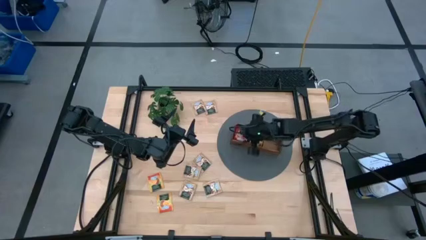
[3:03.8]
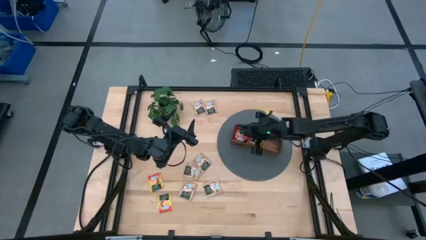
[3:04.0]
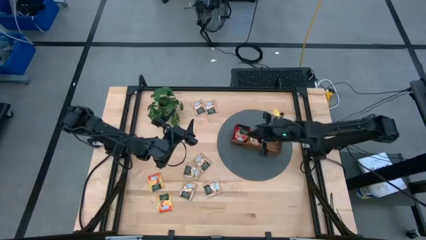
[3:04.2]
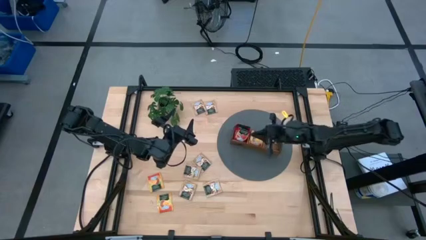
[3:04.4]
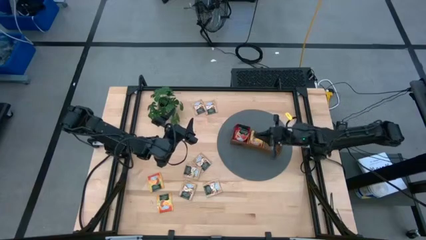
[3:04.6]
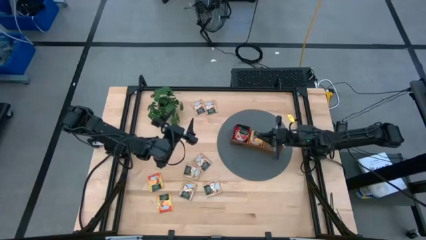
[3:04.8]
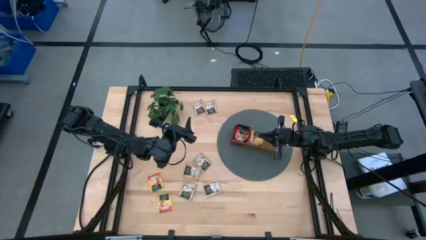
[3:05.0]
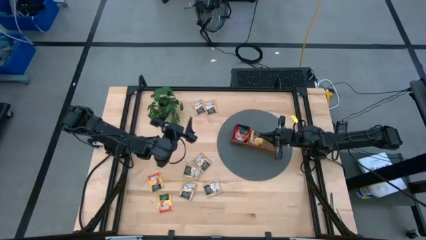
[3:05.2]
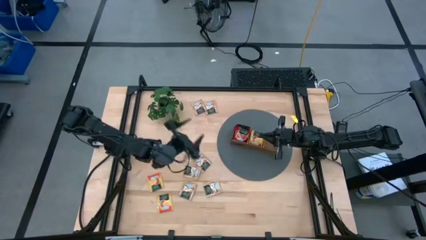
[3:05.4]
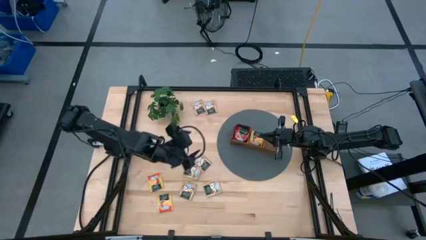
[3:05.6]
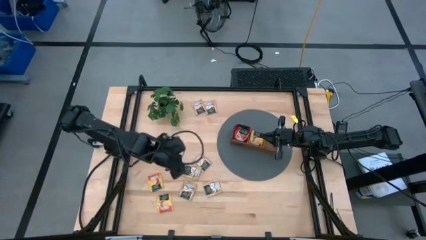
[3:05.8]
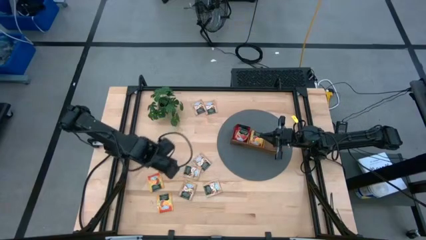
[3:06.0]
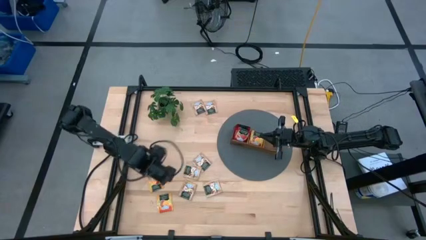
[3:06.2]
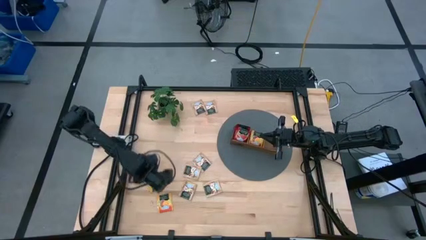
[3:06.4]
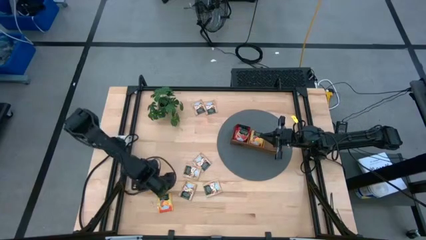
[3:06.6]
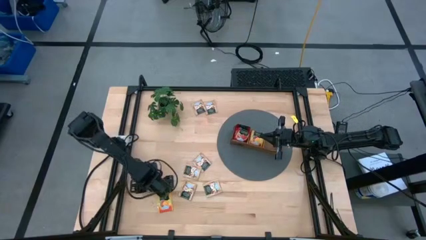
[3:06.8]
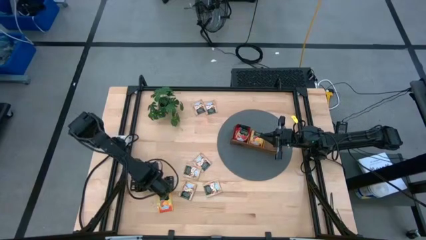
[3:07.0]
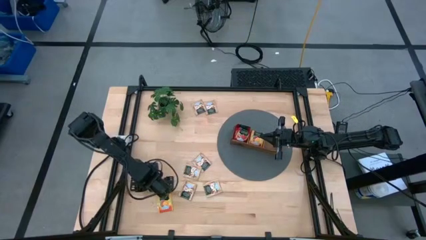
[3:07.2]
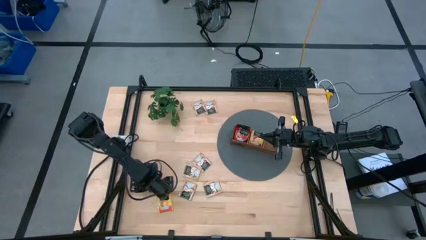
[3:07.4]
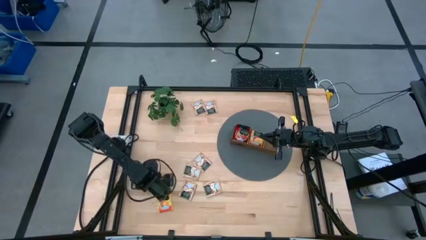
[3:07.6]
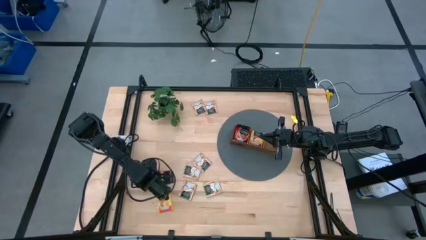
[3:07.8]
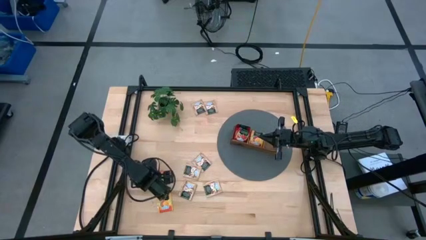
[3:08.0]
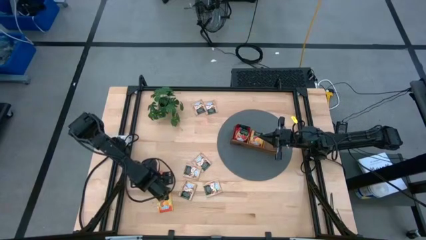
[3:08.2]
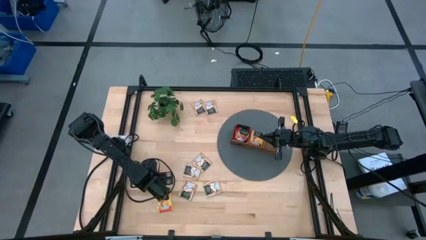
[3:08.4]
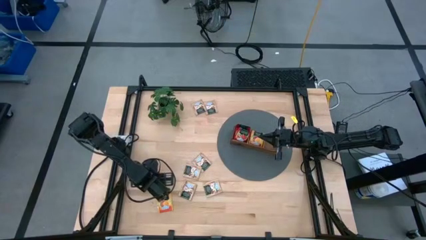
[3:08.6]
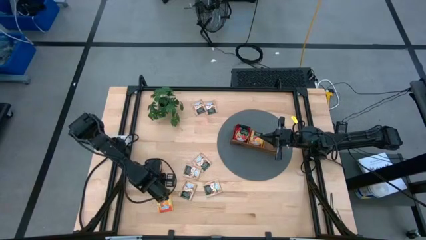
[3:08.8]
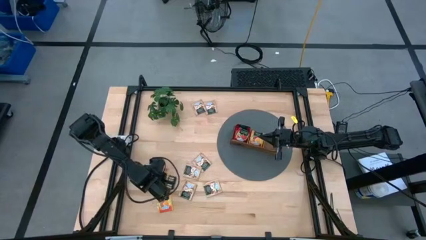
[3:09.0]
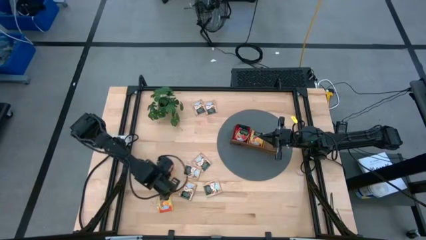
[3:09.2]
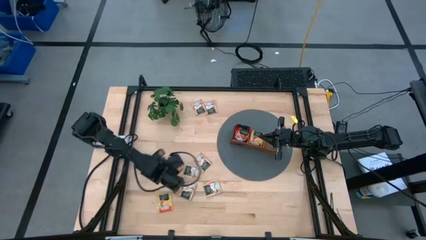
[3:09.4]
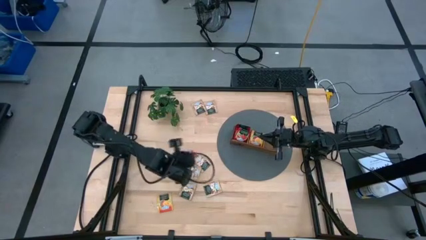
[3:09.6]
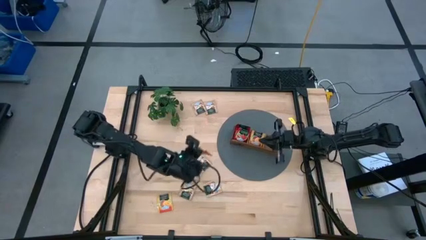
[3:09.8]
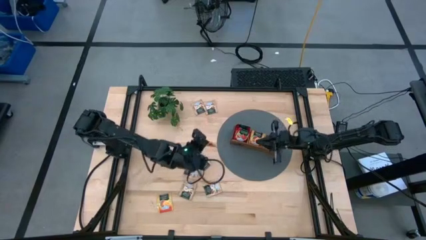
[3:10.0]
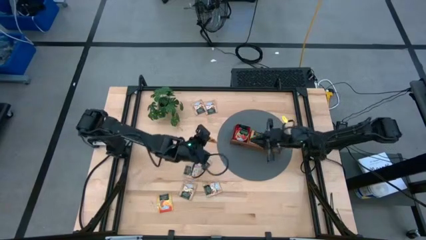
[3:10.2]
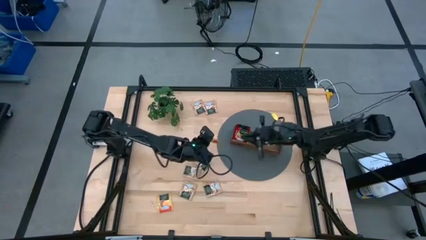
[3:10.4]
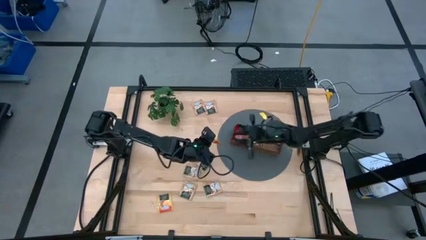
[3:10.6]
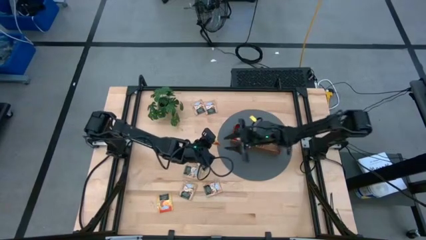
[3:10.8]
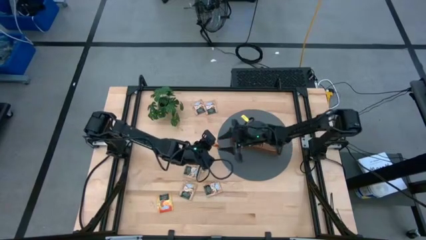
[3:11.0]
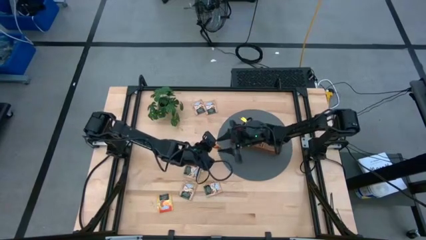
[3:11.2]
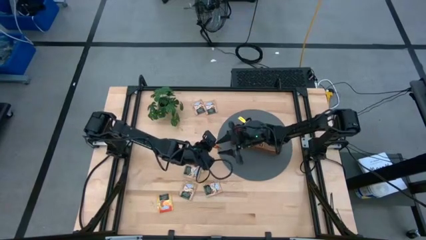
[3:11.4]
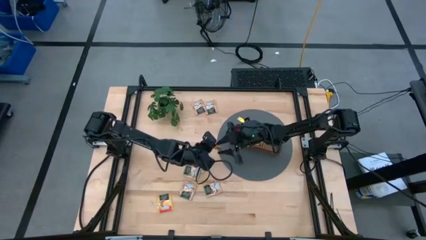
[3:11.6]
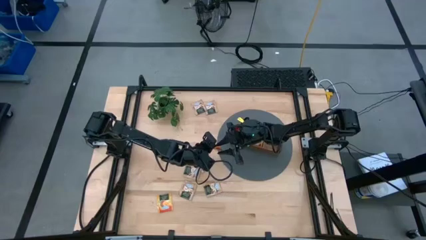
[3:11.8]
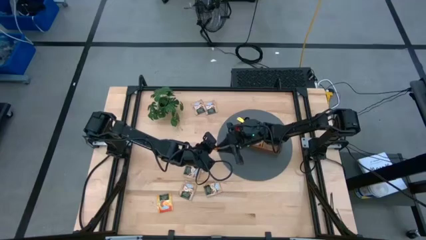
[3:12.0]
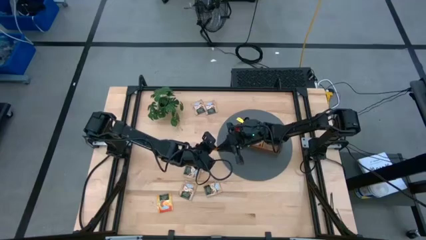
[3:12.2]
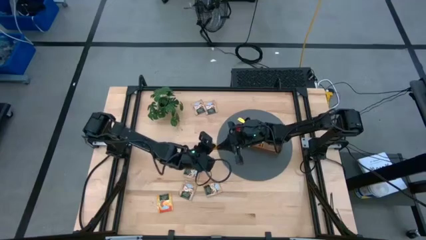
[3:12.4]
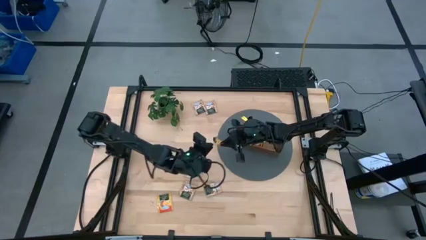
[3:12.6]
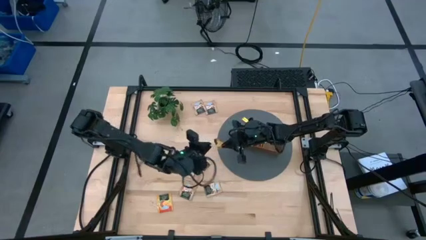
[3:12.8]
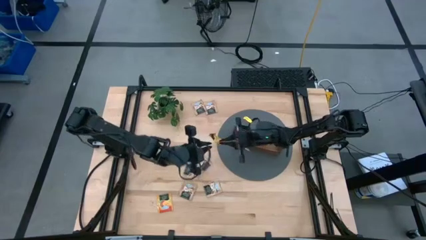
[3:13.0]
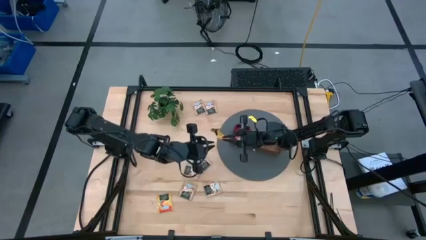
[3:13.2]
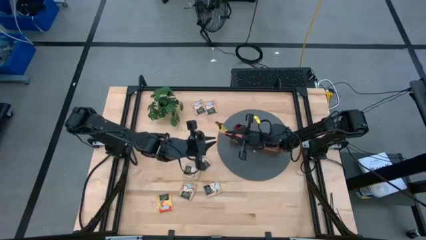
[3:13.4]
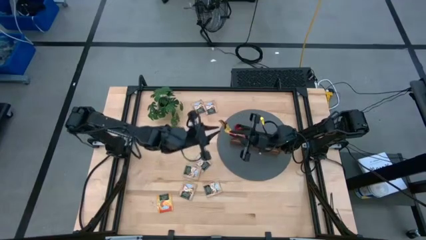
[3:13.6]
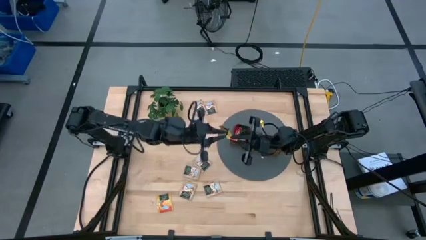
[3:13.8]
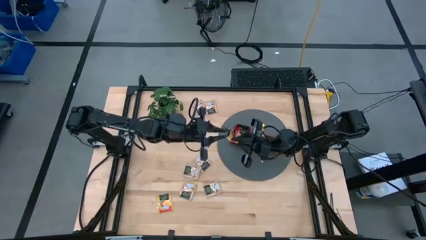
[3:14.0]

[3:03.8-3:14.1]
Task: Pick & Place Tea
Put the yellow tea bag into the middle section of the wooden organizer

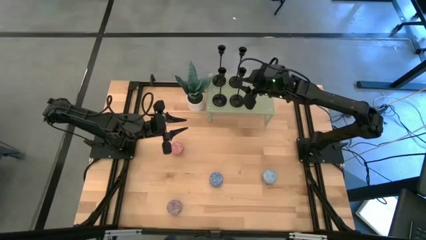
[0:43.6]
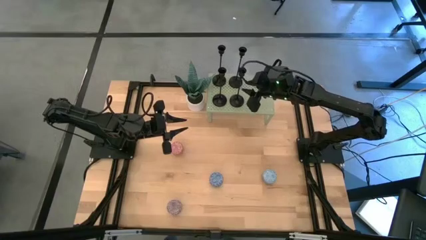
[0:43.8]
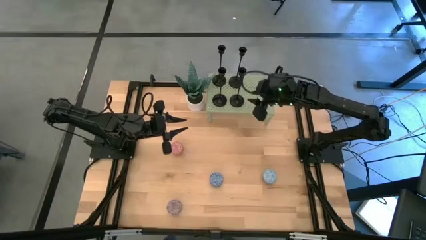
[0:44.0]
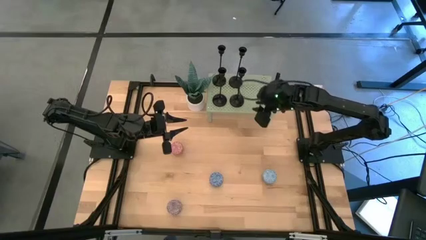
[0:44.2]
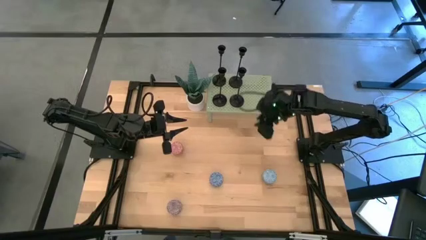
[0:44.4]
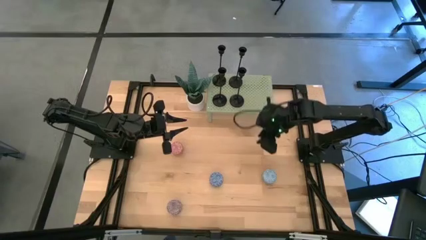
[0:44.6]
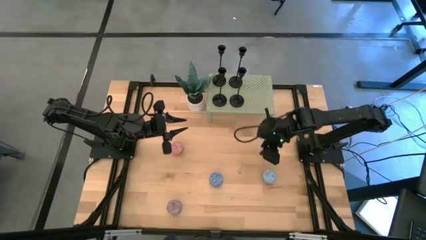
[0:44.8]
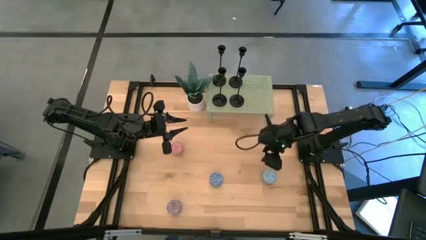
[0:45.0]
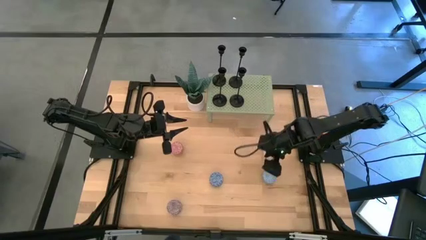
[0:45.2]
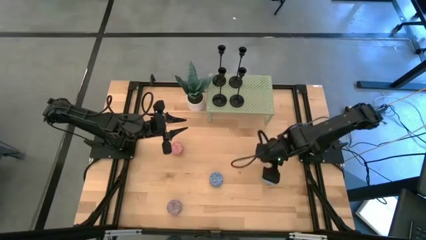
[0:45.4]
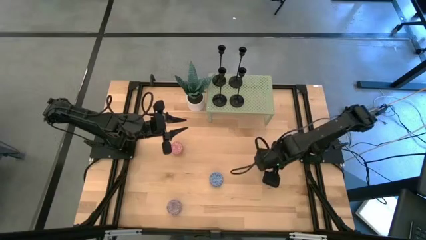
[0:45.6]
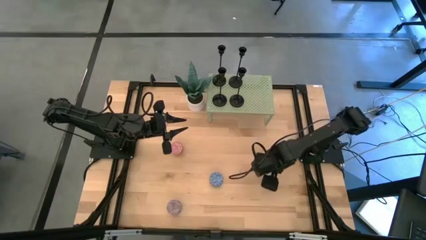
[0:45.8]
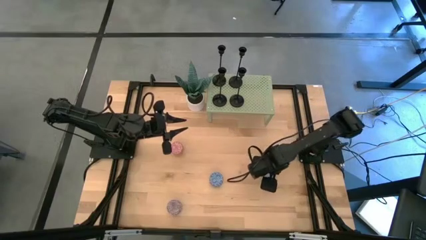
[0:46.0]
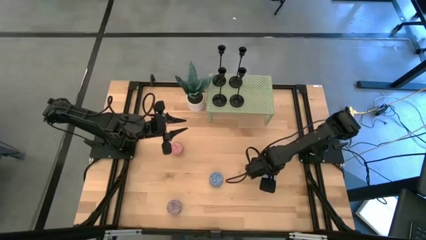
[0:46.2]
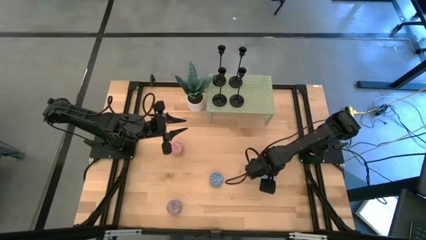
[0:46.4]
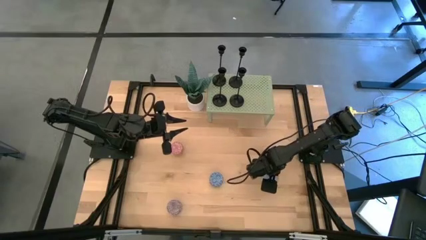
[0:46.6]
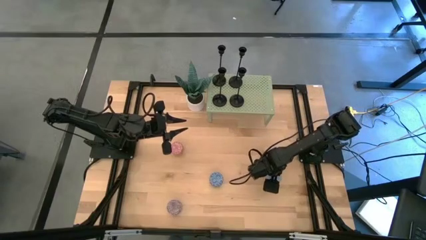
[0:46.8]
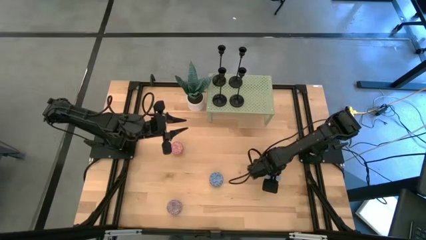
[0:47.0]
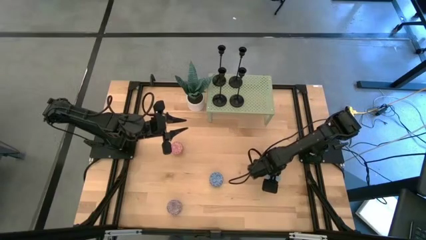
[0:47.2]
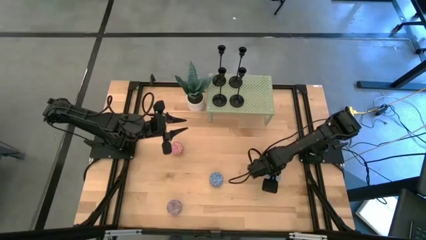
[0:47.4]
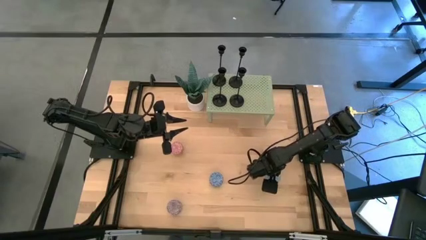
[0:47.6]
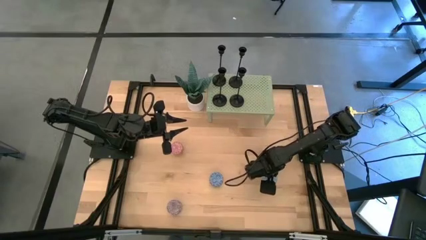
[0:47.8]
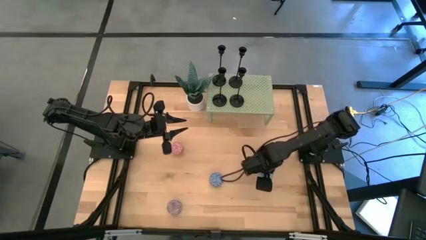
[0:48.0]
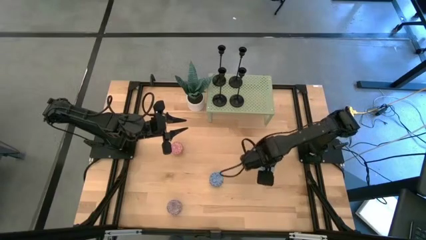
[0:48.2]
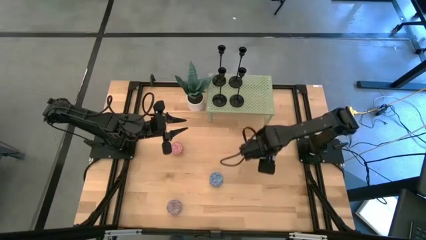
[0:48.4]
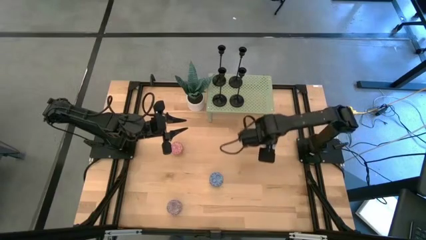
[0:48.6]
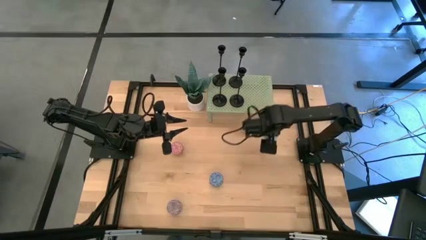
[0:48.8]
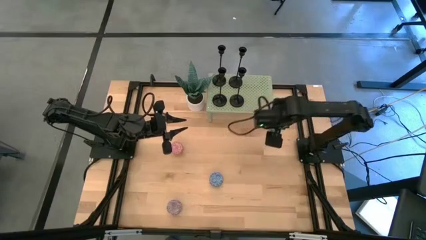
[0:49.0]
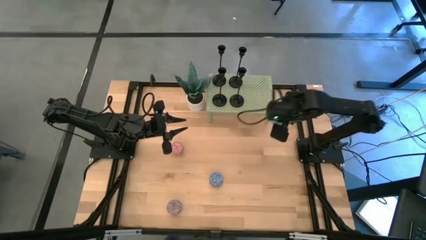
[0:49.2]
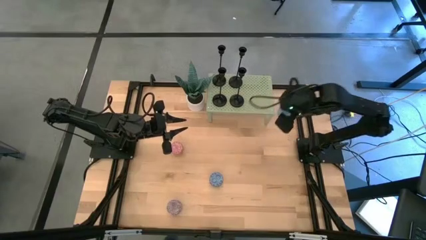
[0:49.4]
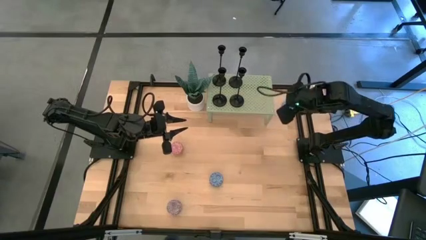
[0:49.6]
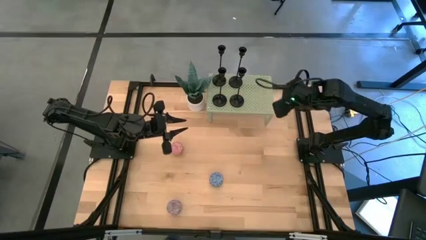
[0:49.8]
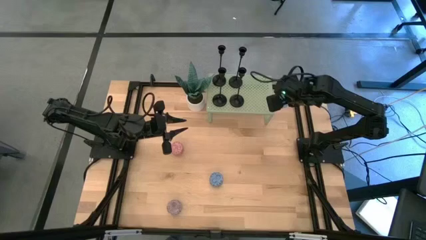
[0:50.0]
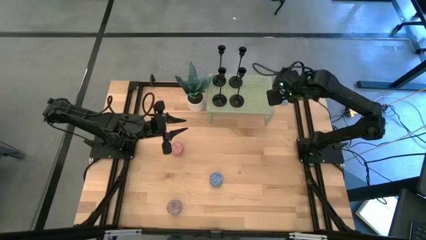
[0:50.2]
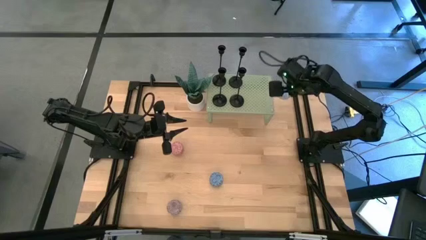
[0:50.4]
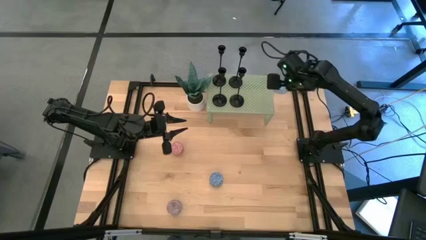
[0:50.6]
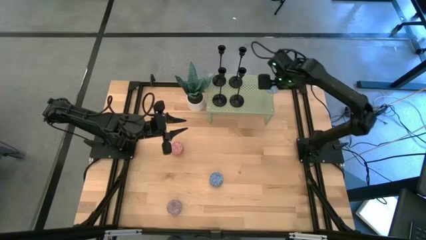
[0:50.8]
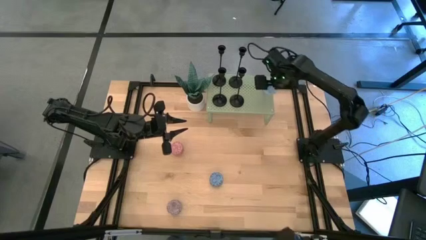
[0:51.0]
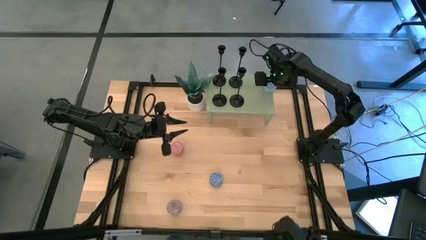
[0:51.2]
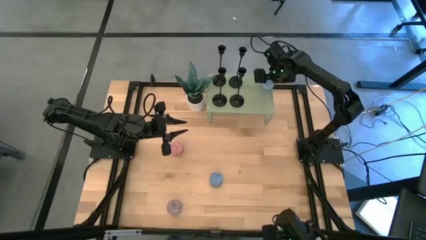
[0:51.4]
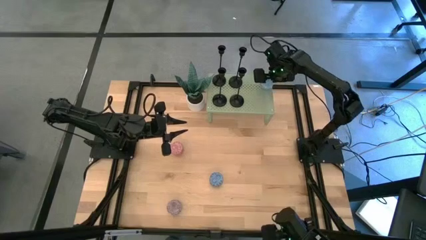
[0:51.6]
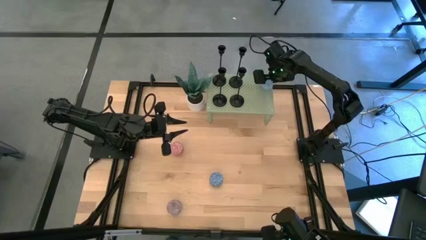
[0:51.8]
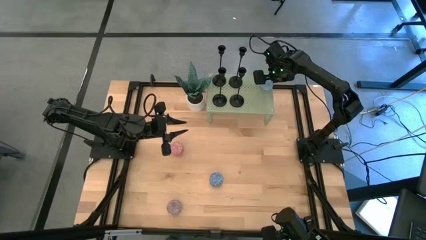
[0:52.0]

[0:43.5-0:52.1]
Task: Pick & Place candle stick holders
Put the light blue scented candle on the shelf
